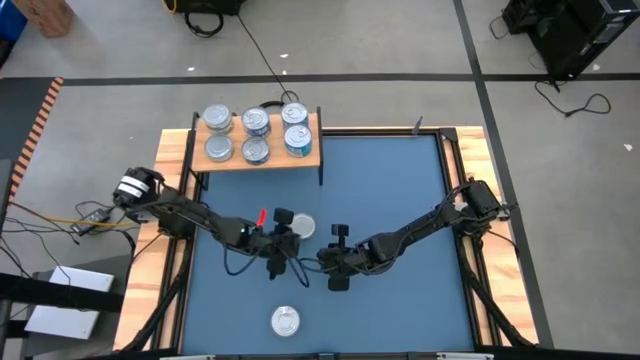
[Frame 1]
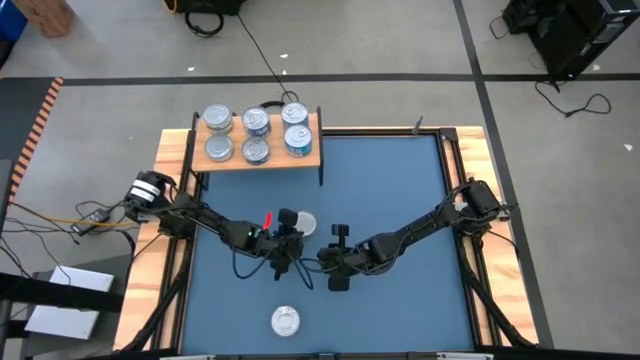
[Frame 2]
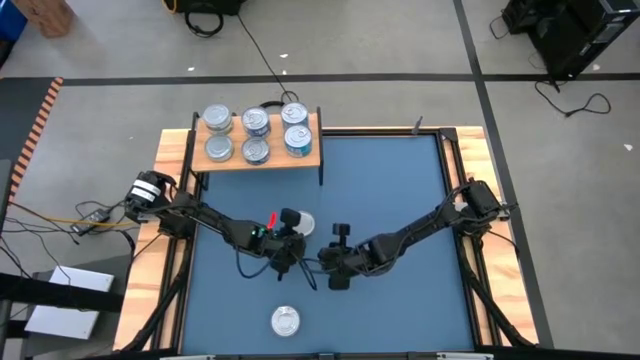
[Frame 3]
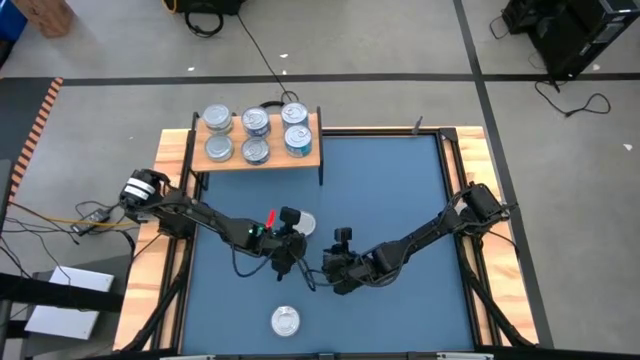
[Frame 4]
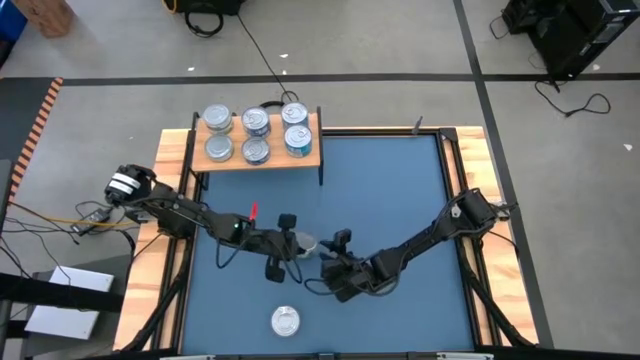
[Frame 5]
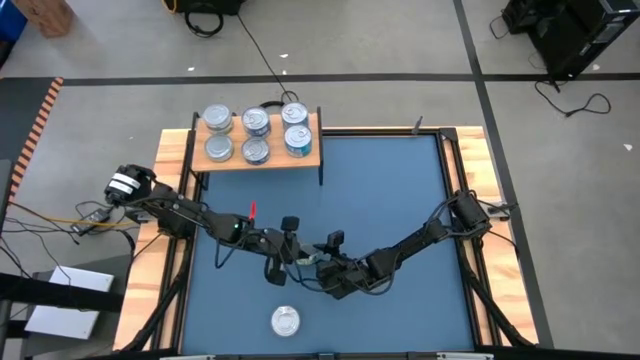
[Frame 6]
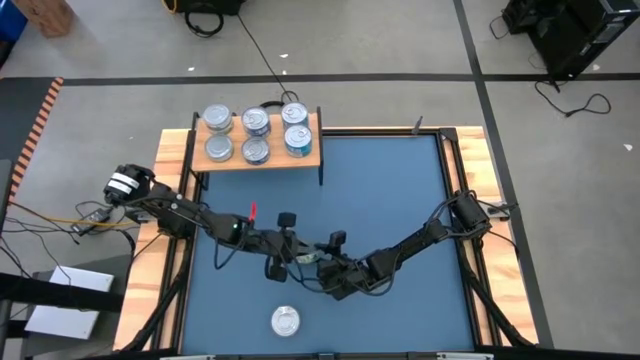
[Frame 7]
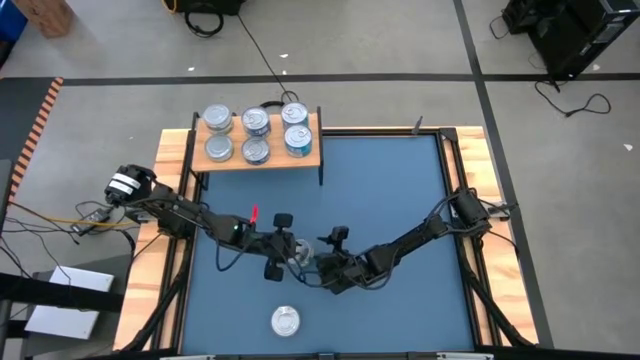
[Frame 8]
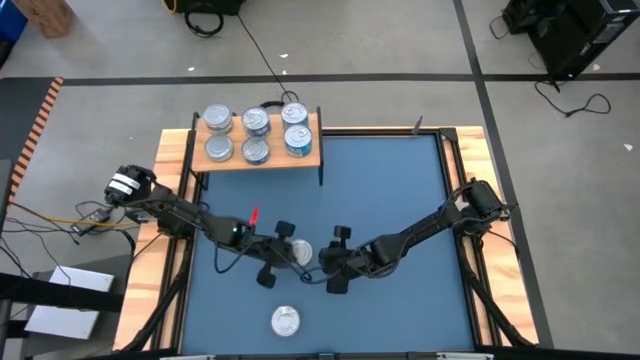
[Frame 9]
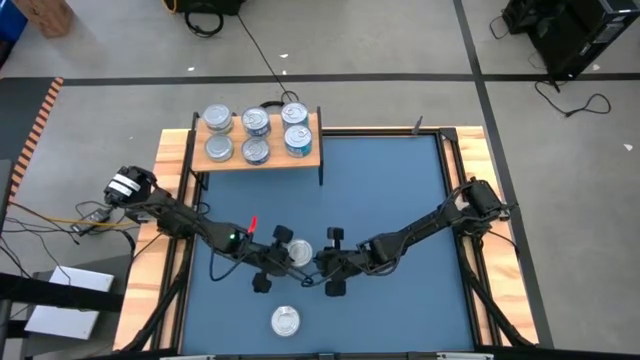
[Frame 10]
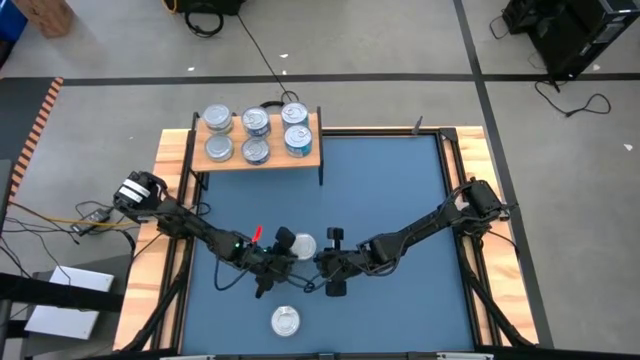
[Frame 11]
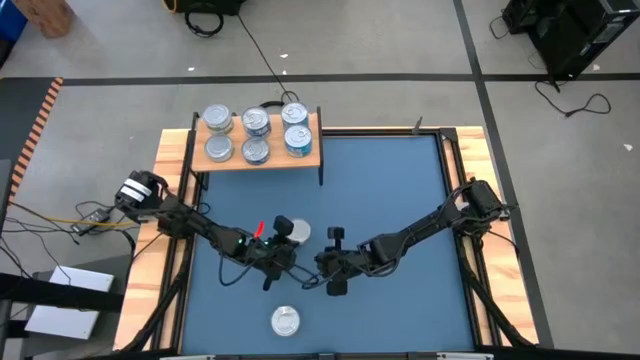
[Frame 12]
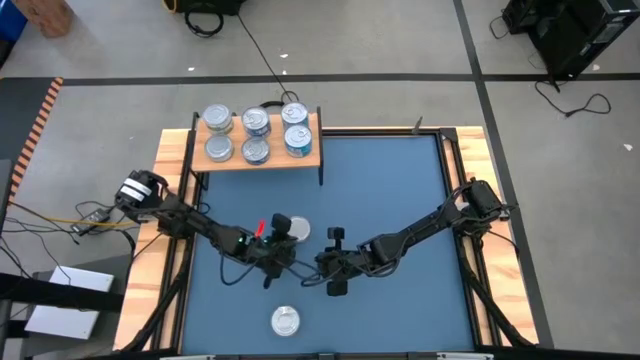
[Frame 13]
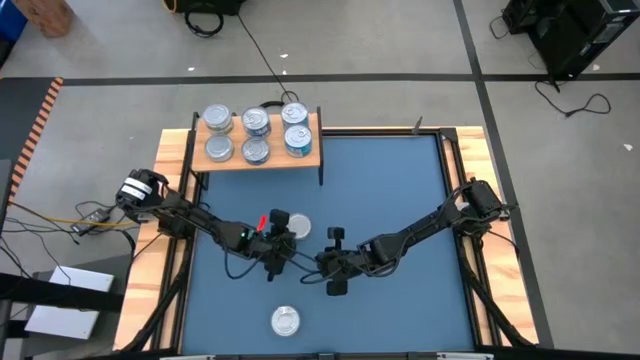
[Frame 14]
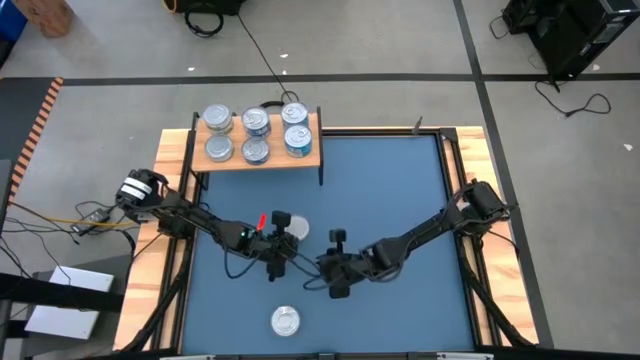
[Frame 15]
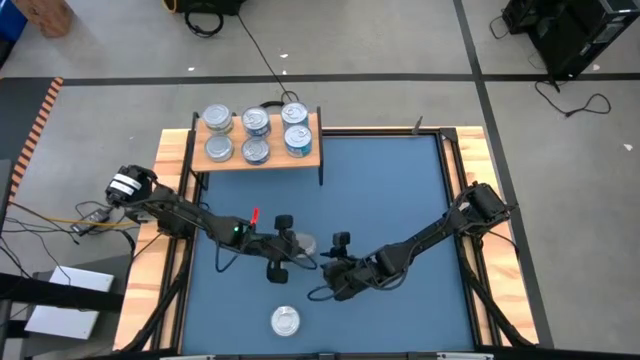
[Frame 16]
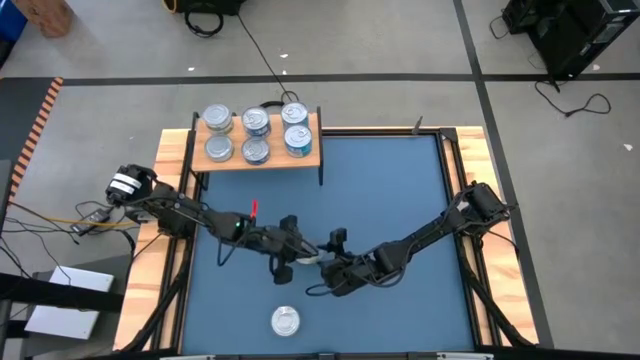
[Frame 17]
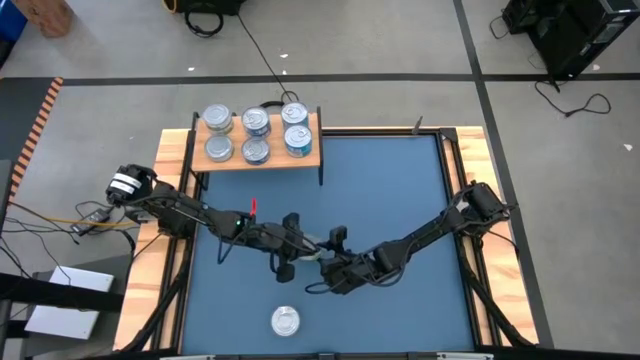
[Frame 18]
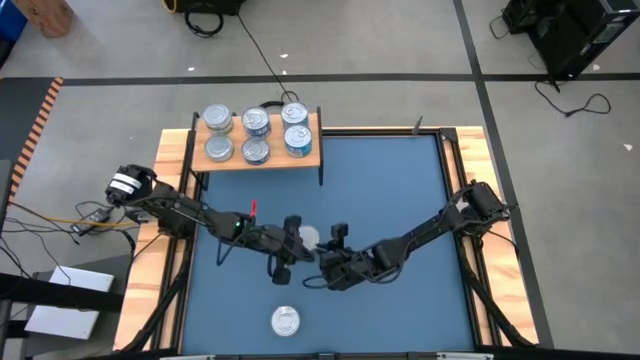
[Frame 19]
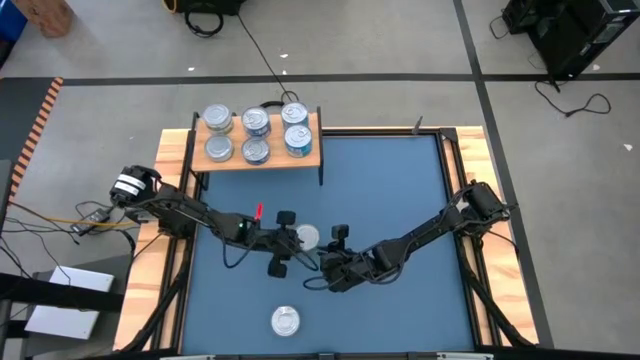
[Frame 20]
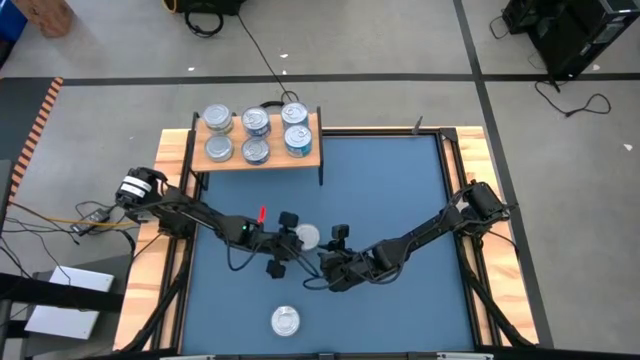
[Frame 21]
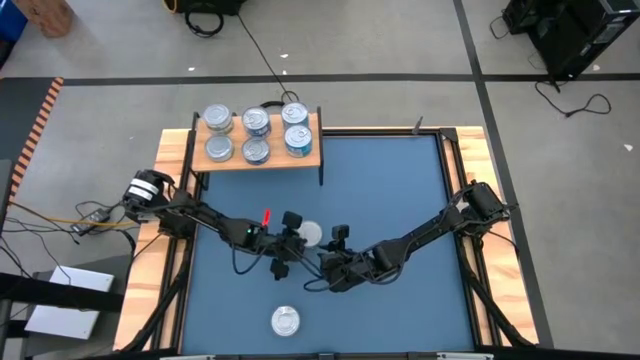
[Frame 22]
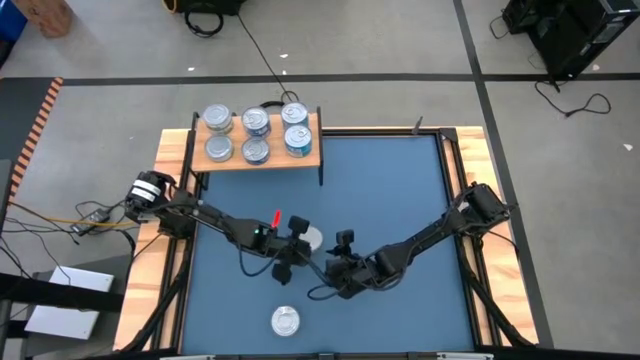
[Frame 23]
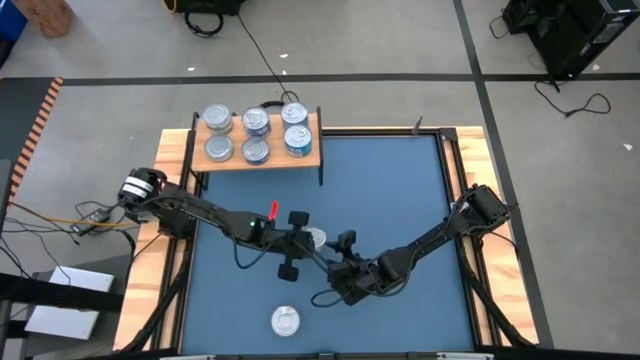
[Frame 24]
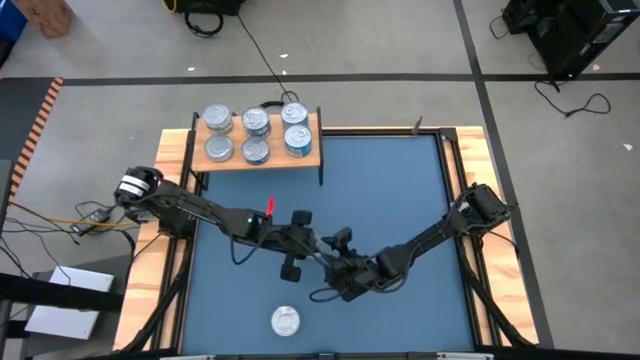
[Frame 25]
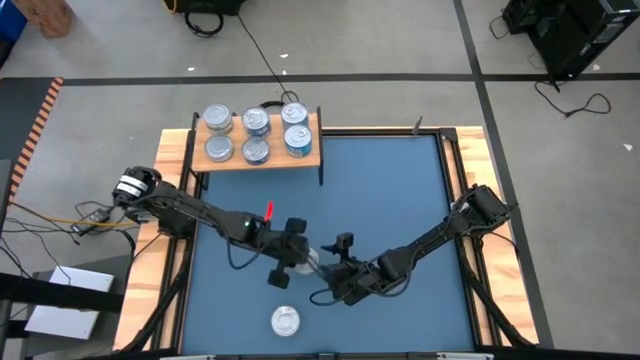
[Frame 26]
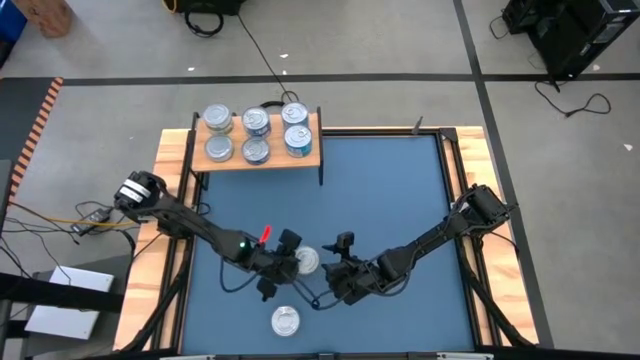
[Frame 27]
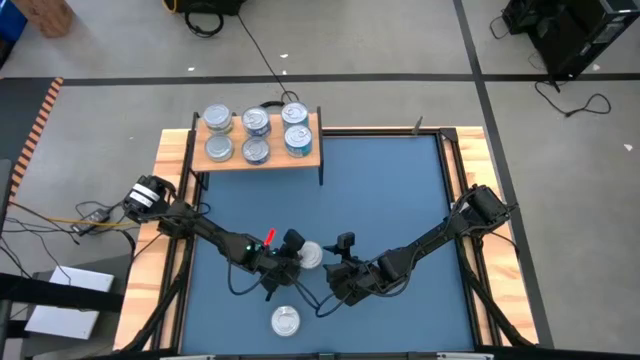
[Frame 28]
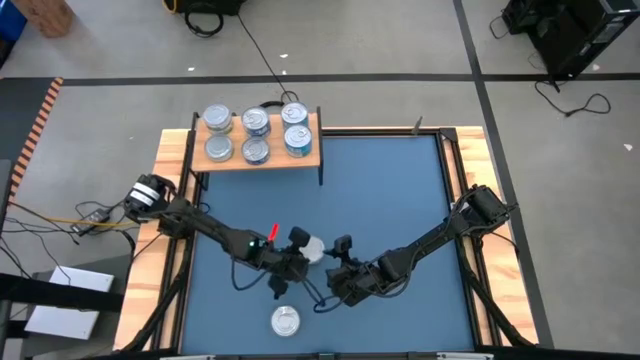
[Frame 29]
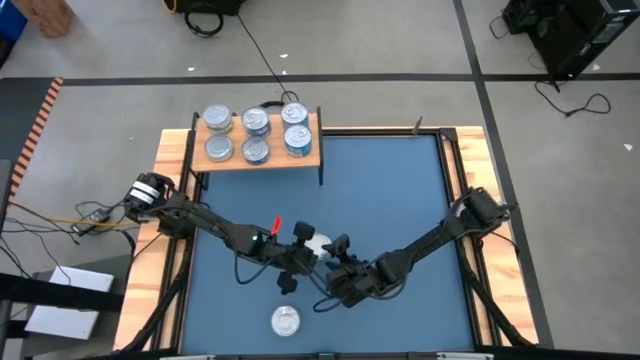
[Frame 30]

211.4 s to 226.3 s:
Task: Stack canned seafood by type on shelf
Stack the green white tuna can on top of the green white tuna can on the shelf

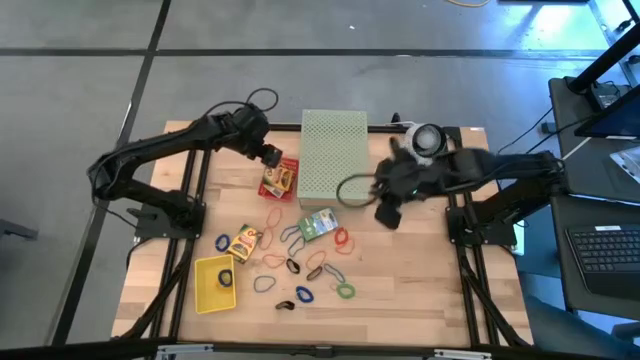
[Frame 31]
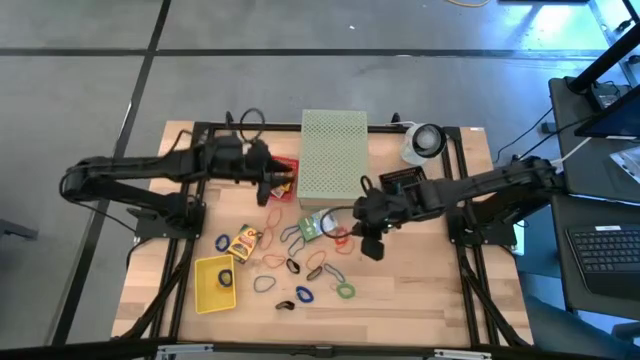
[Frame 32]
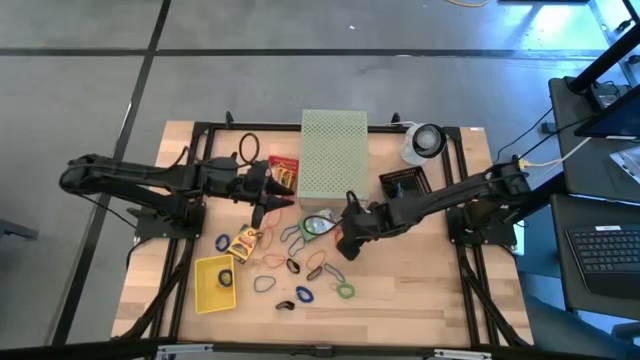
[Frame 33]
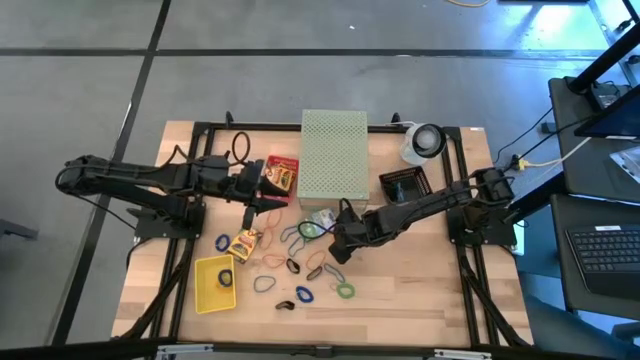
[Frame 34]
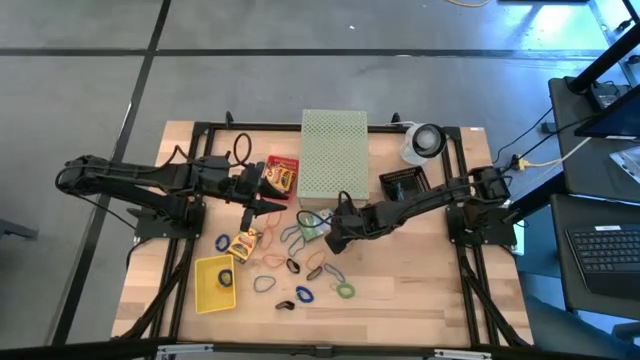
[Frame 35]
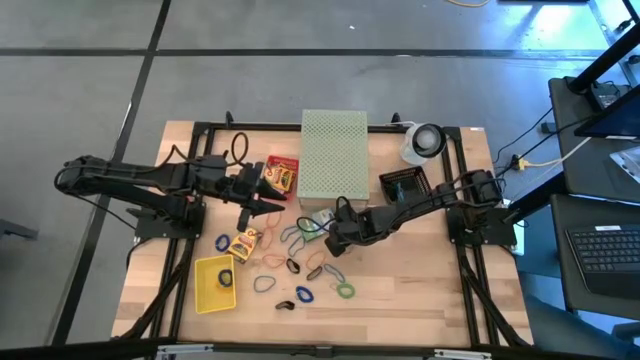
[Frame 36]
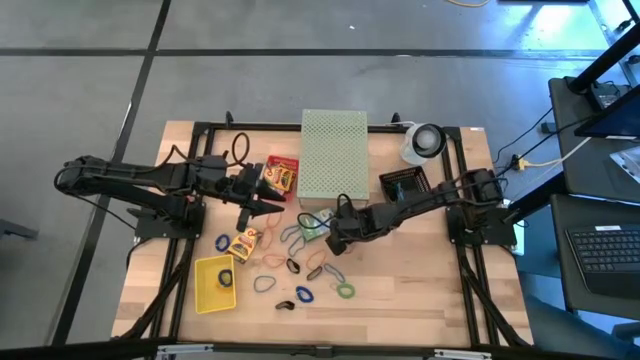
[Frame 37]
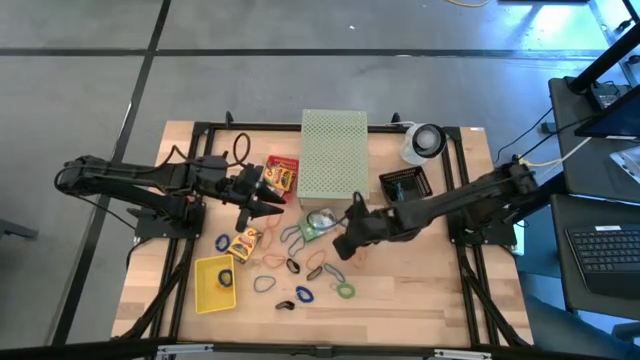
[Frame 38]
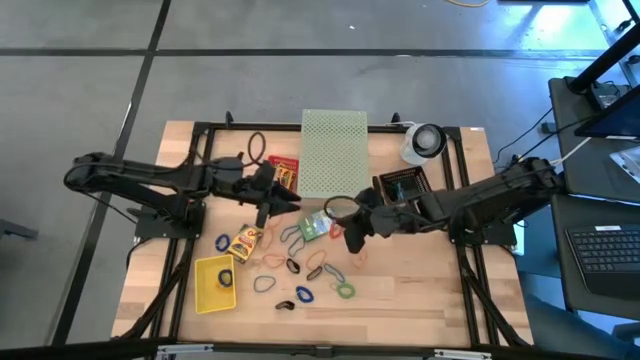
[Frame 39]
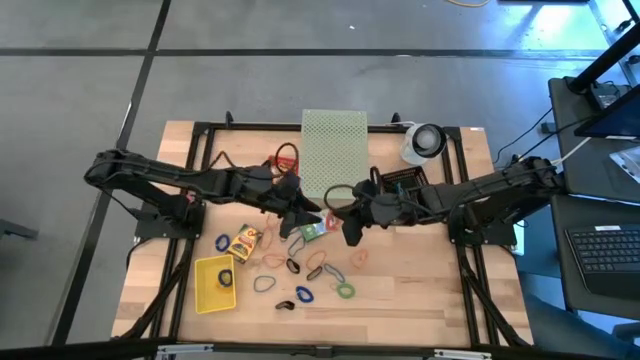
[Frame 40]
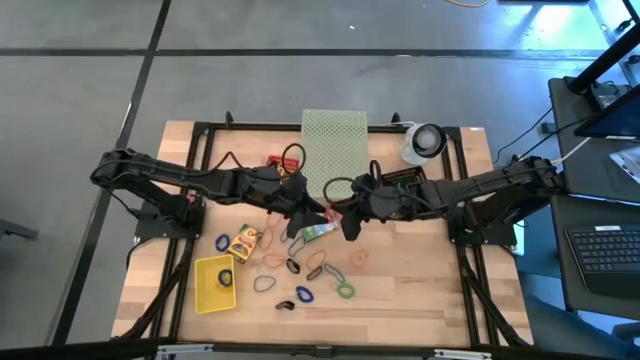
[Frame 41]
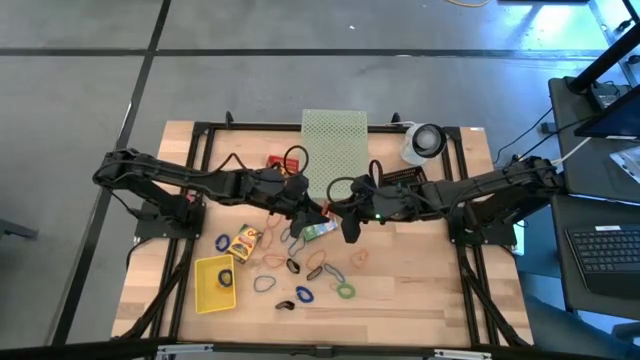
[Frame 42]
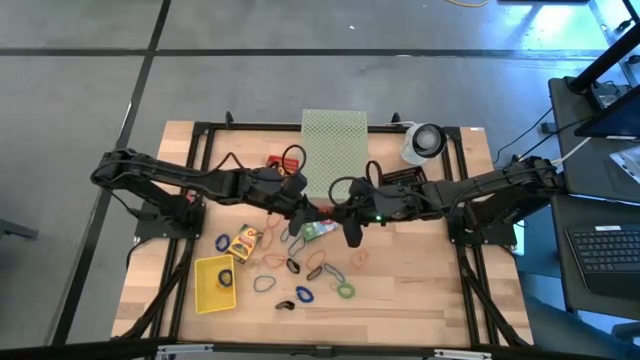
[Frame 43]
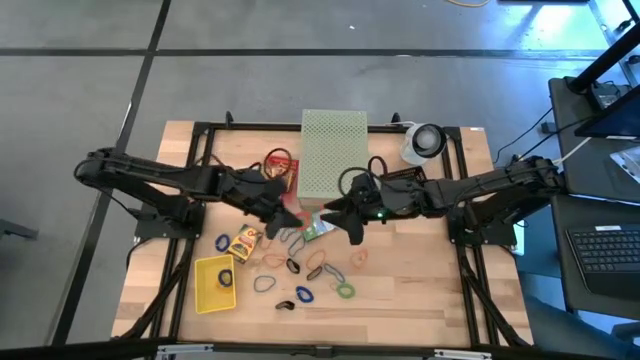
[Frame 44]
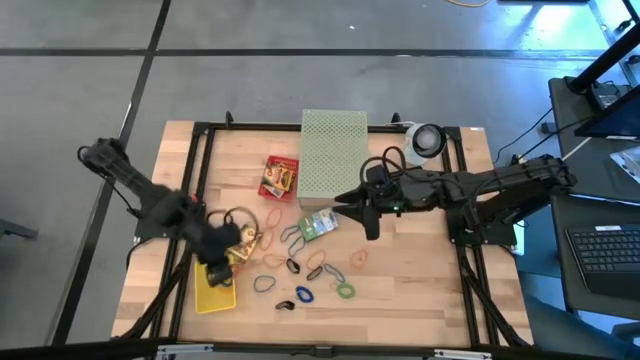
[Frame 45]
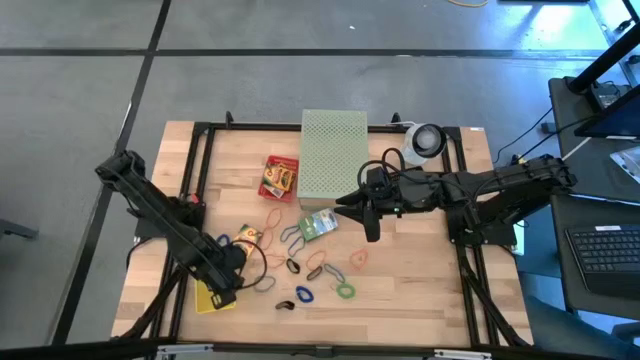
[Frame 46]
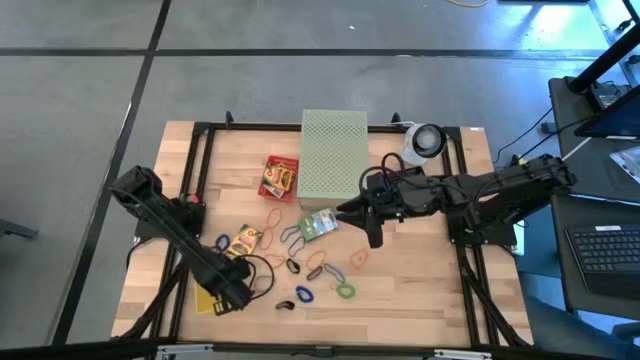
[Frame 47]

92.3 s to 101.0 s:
Task: Pick & Place Office Desk Supplies
Put the orange spring rubber band into the yellow bin
